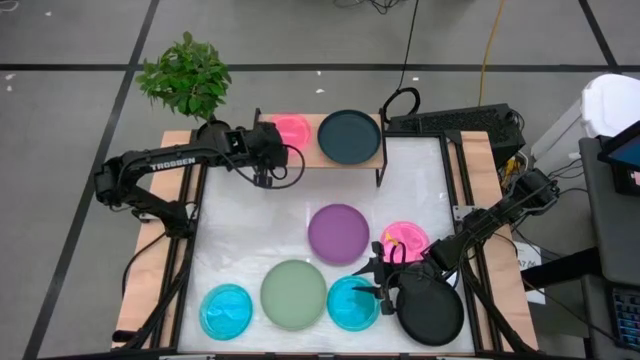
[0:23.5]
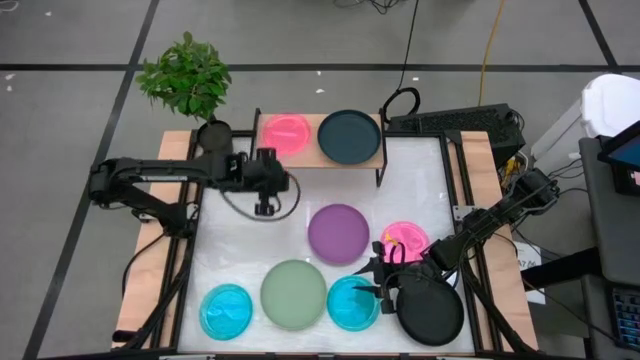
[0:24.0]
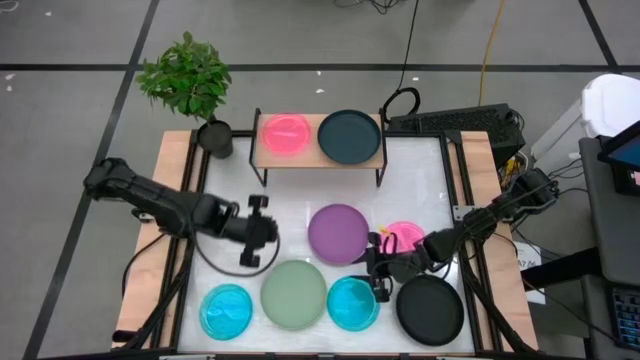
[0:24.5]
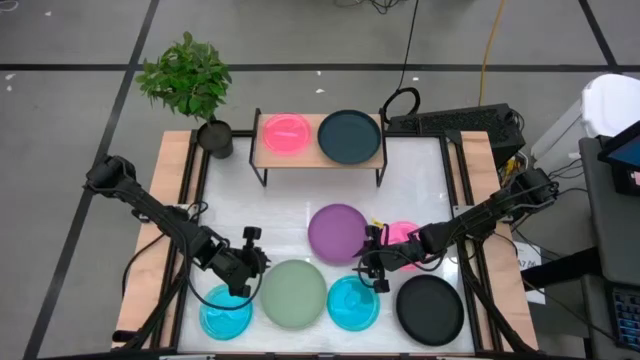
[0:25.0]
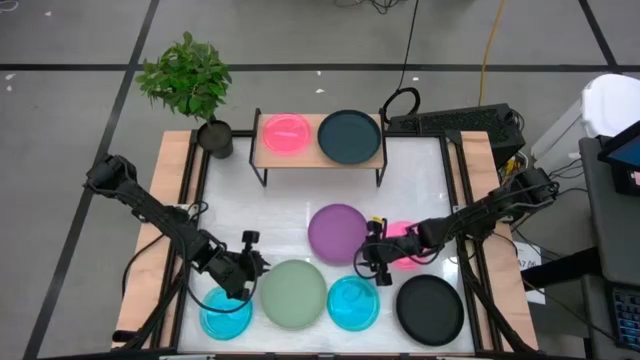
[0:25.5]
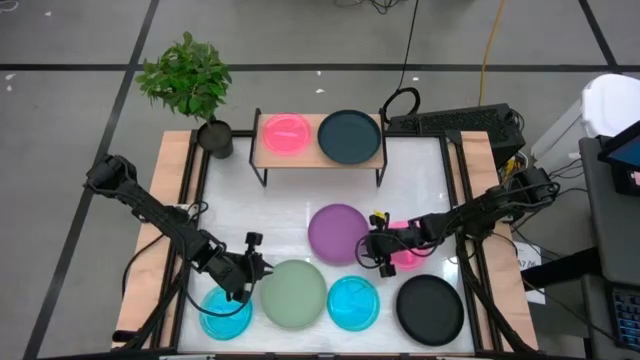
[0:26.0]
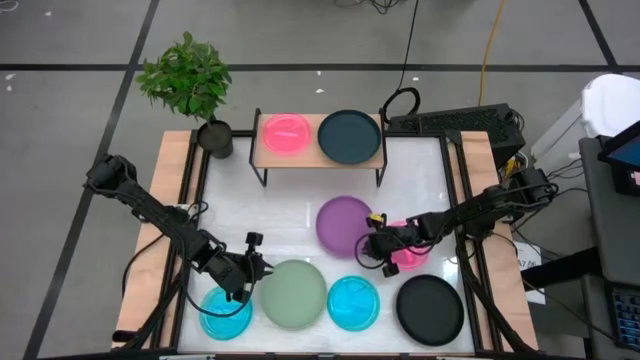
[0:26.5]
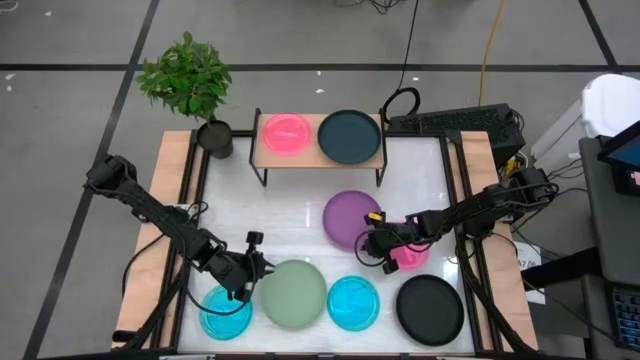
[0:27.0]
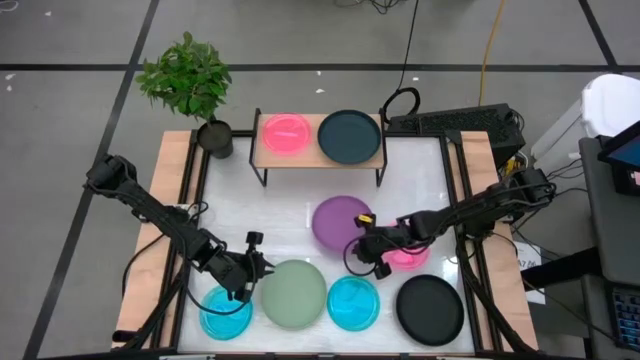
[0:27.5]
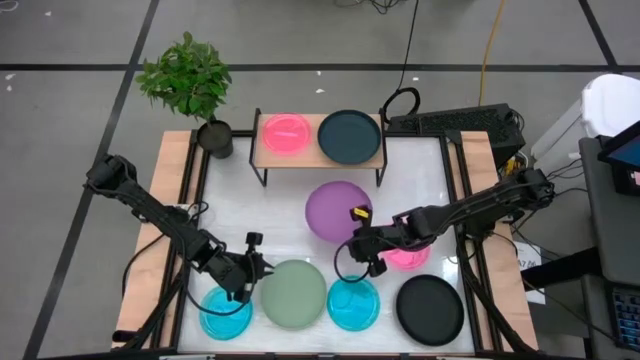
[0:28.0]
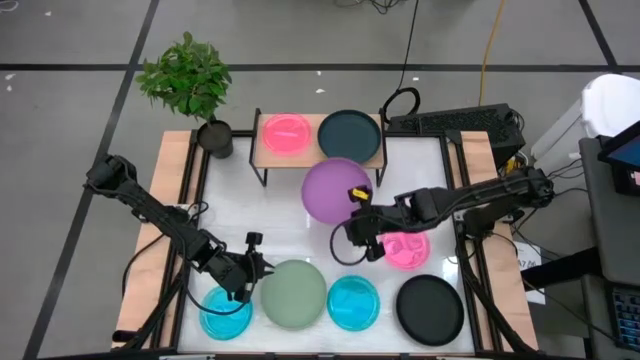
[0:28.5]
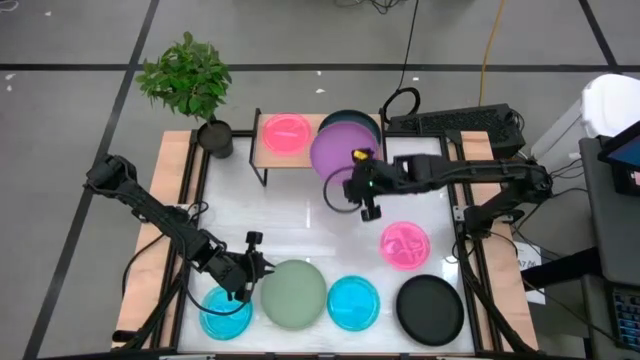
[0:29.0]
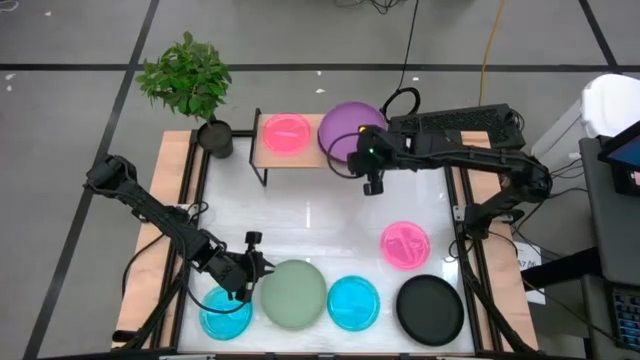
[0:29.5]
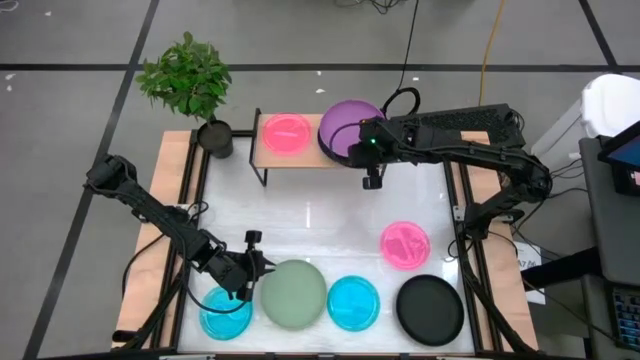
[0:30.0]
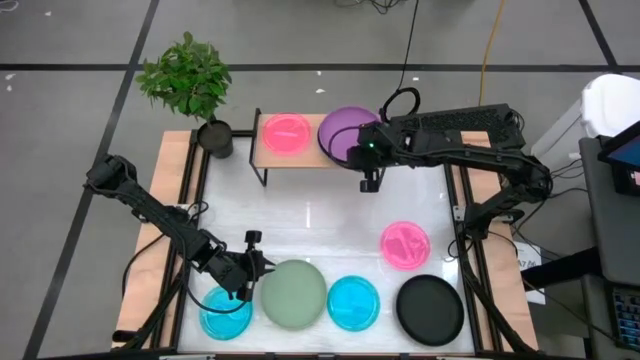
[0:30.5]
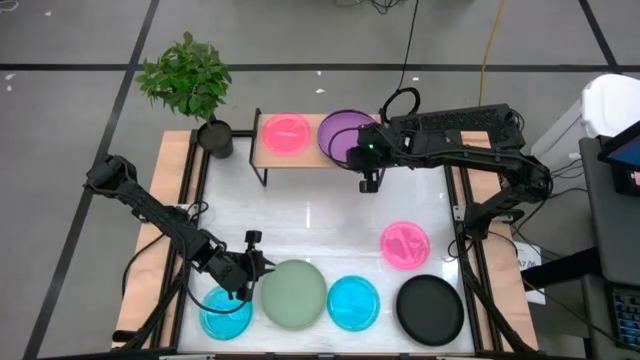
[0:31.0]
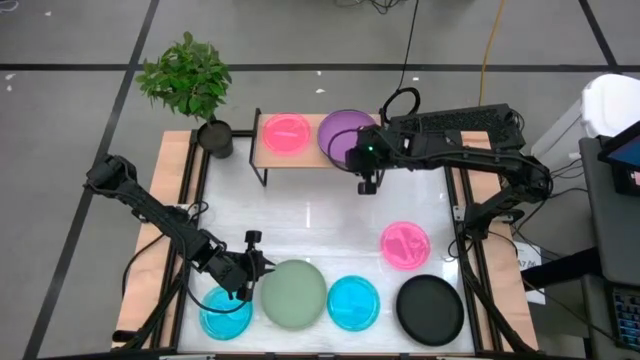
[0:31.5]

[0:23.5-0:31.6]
Task: Place and stack plates onto a shelf
Stack the violet plate on top of the black plate on the shelf

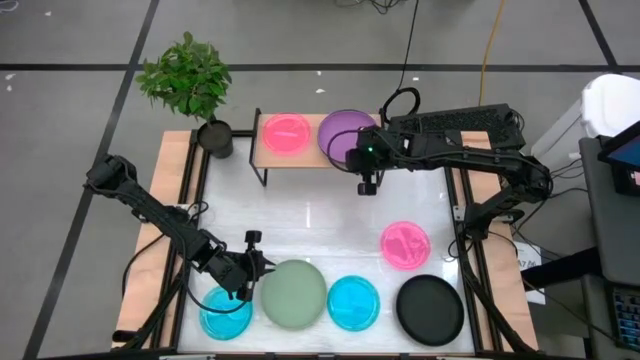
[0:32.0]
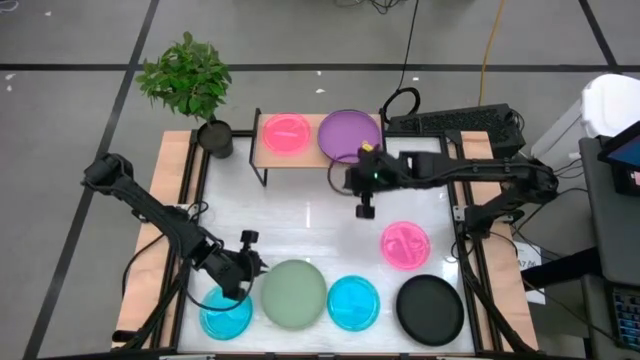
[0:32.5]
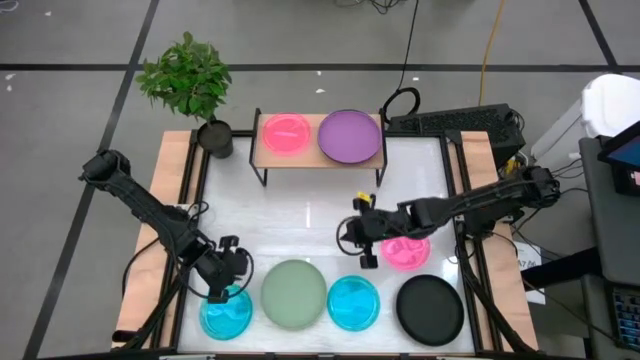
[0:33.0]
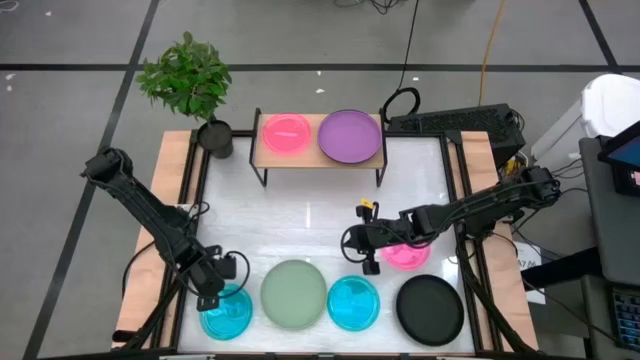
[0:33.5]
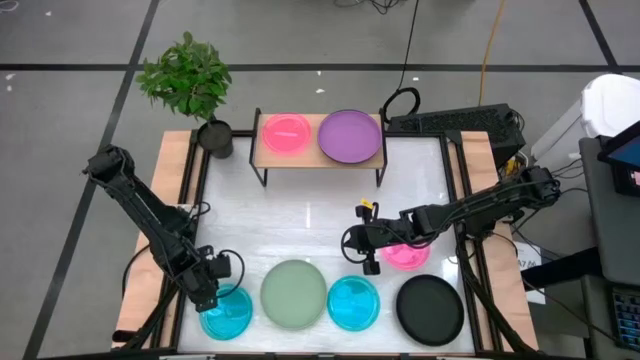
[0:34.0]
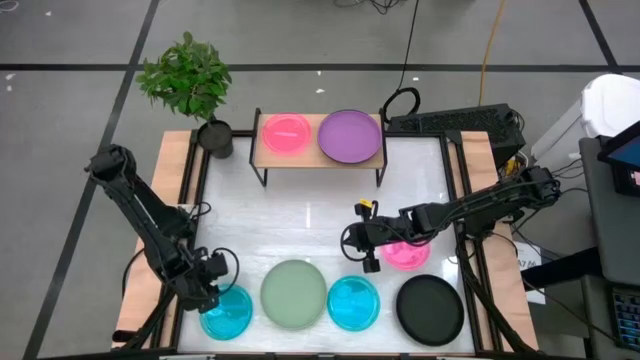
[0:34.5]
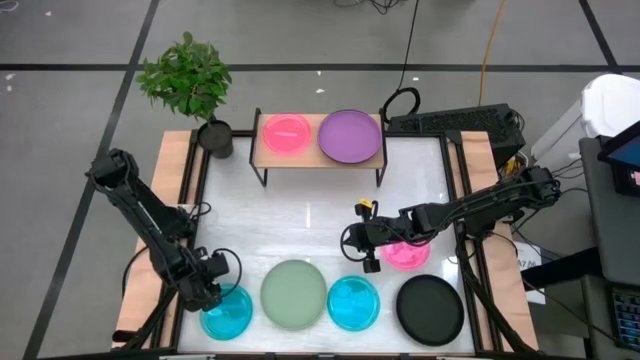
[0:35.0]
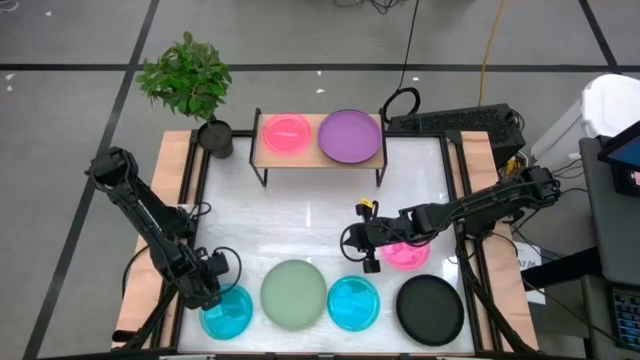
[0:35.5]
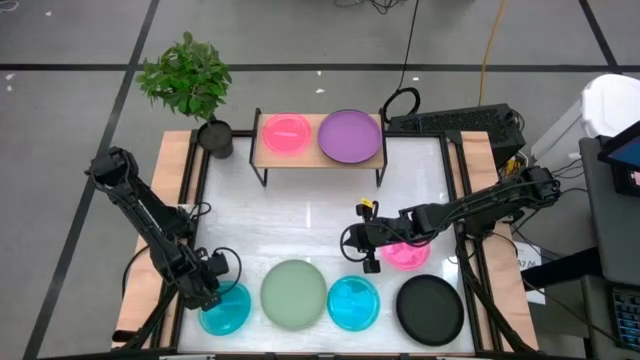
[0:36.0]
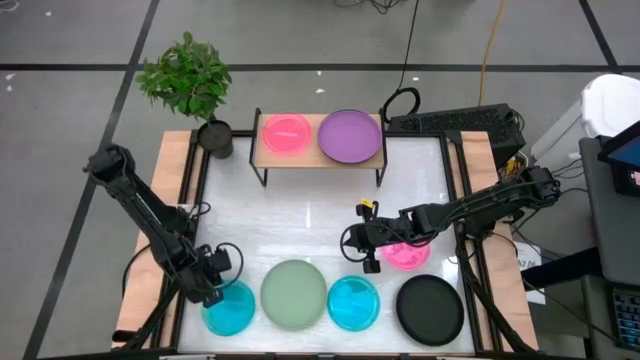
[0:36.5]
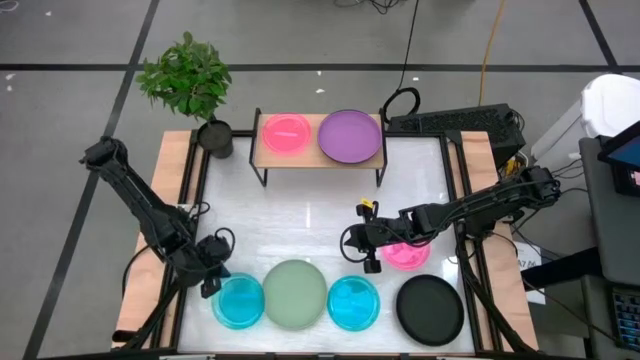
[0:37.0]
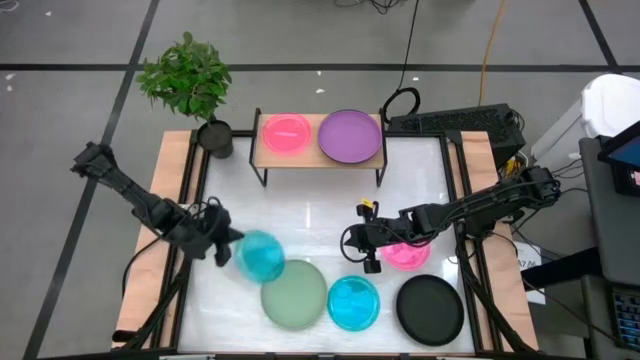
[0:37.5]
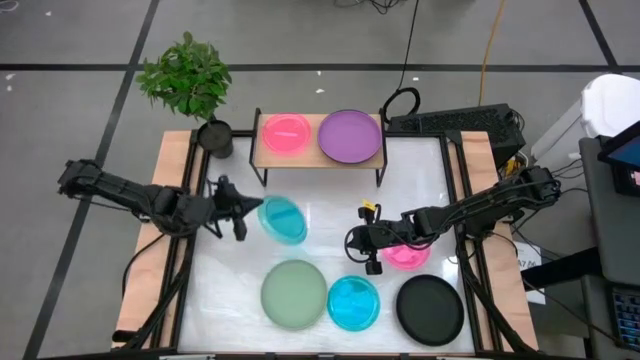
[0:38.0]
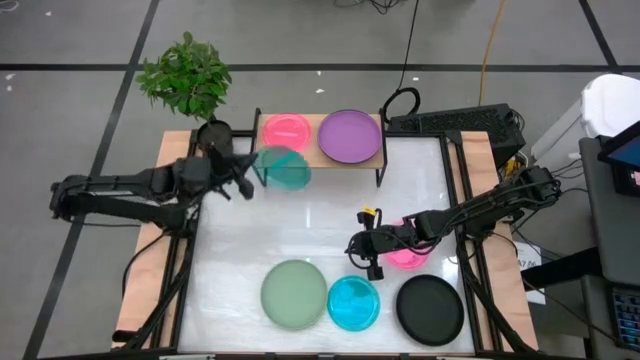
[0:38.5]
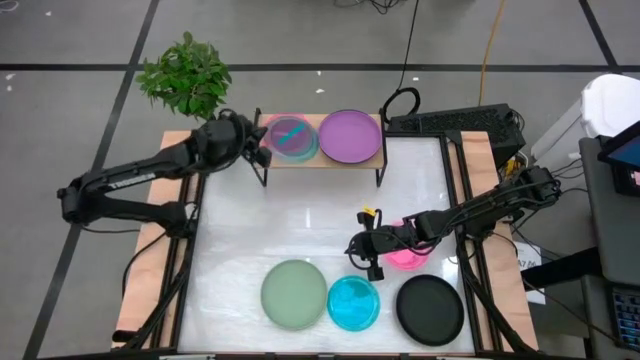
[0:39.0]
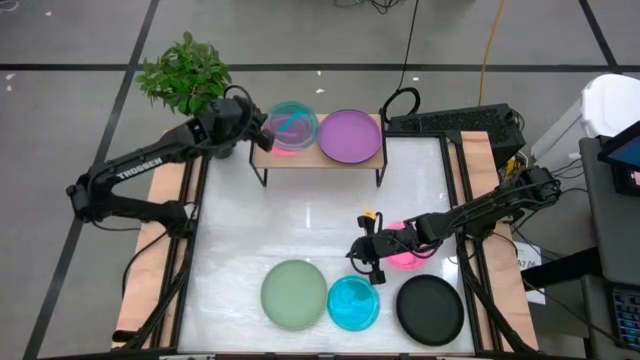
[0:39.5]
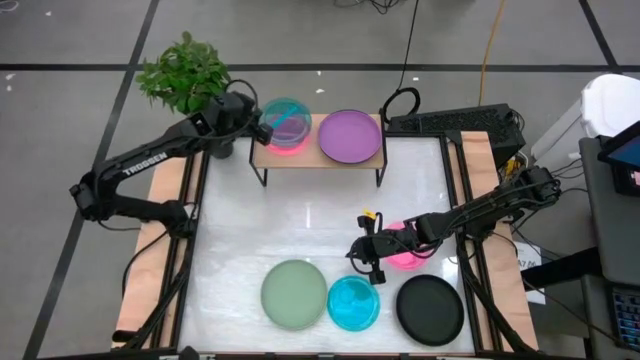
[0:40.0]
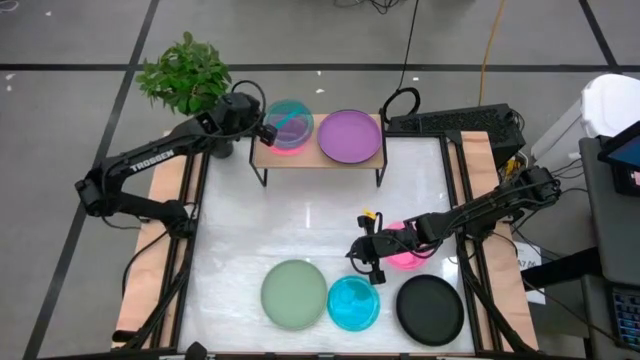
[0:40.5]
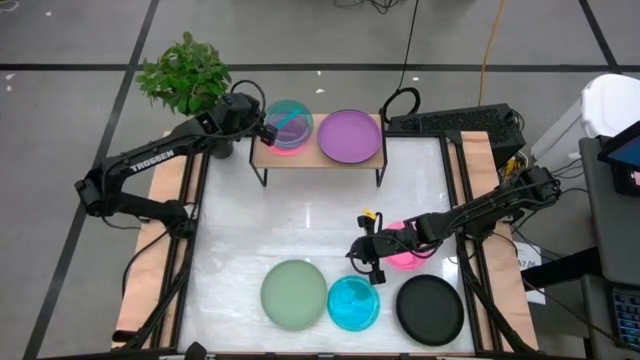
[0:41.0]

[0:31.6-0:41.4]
Stack the left blue plate on top of the pink plate on the shelf

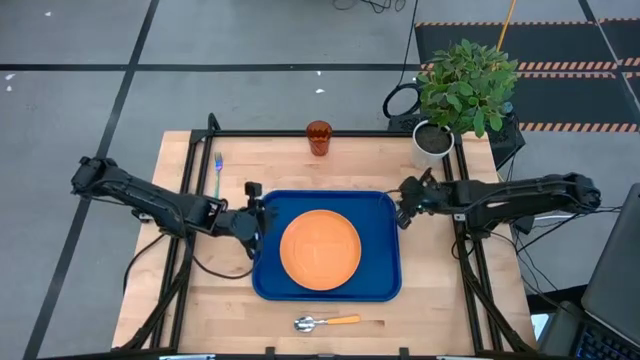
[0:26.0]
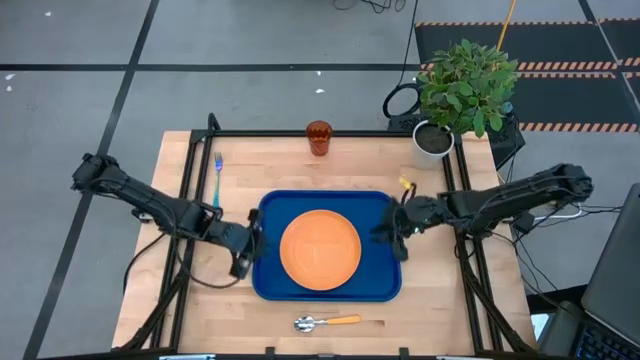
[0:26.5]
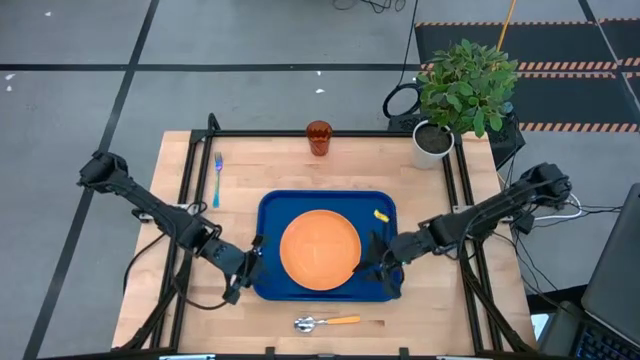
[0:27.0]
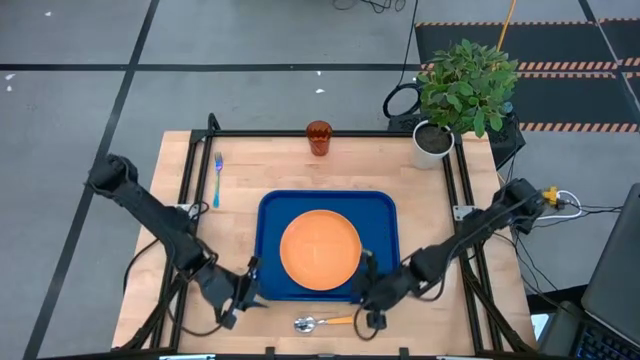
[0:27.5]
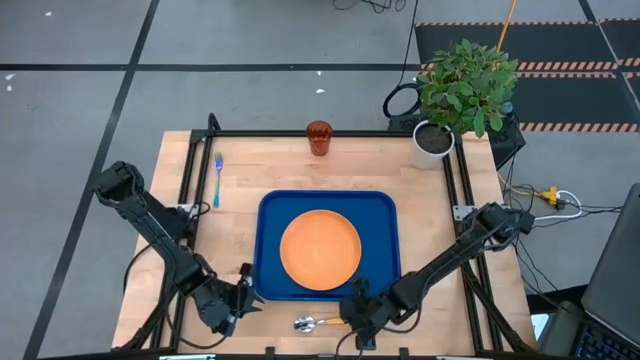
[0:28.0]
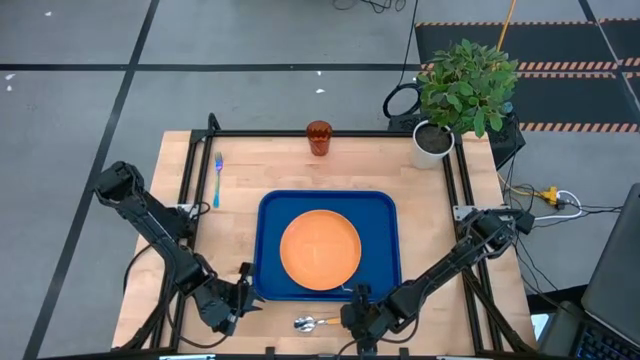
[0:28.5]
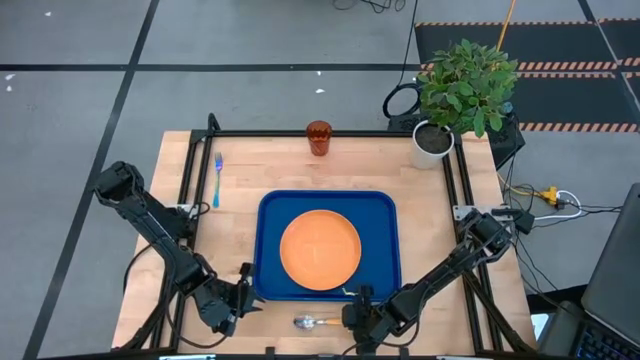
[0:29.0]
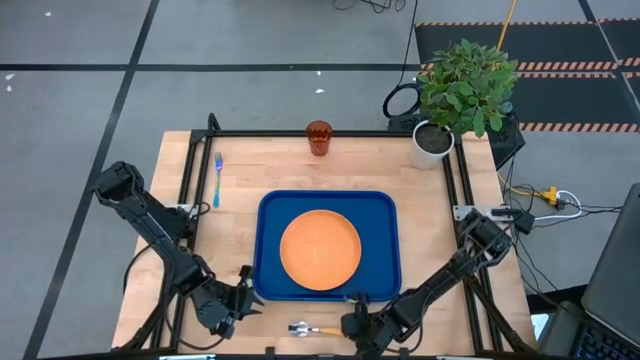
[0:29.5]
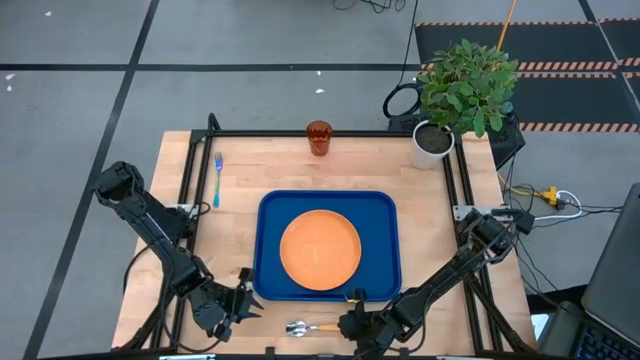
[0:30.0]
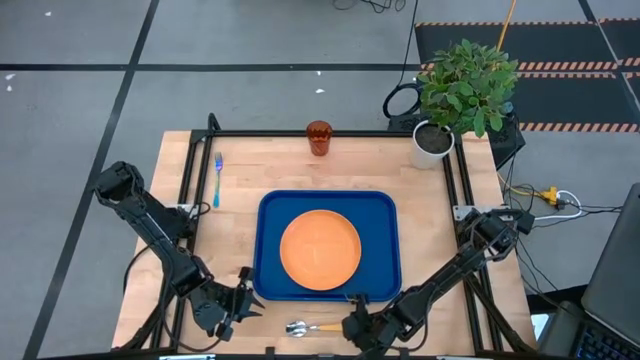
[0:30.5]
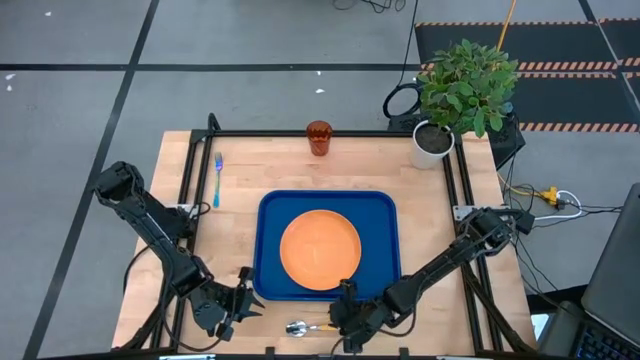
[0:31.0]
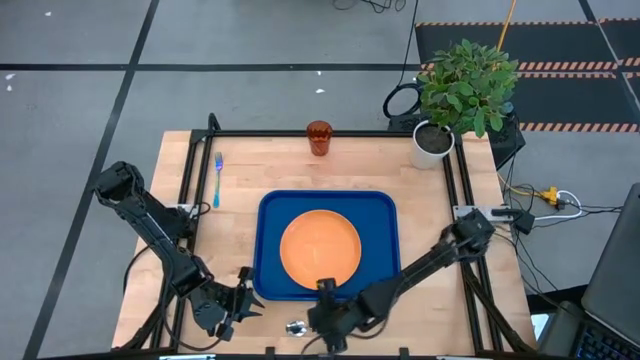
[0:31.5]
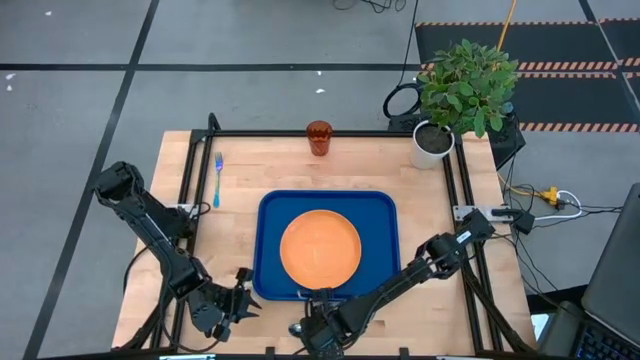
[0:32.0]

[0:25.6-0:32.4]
Task: Pick and place plate/cup/fork/spoon on tray
Put the yellow spoon on the blue serving tray to the left of the orange plate
